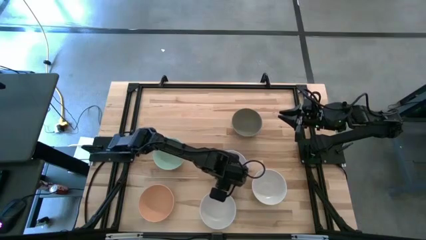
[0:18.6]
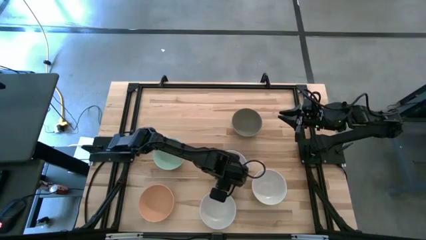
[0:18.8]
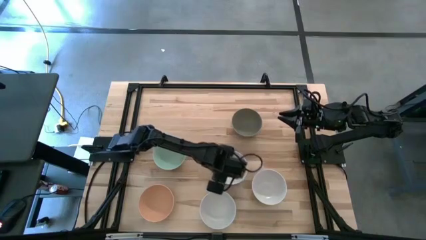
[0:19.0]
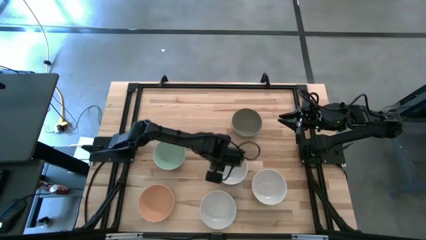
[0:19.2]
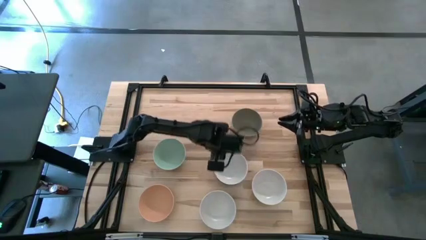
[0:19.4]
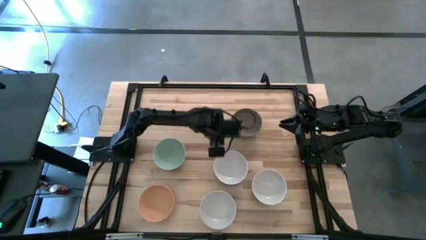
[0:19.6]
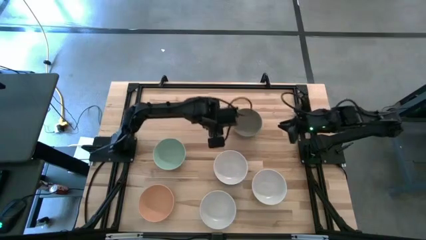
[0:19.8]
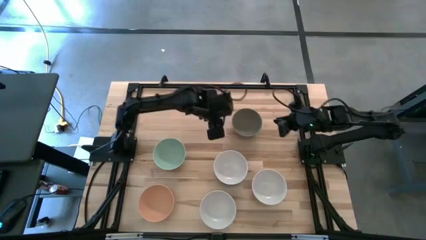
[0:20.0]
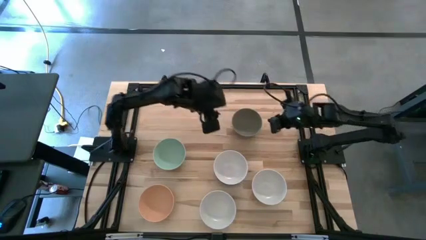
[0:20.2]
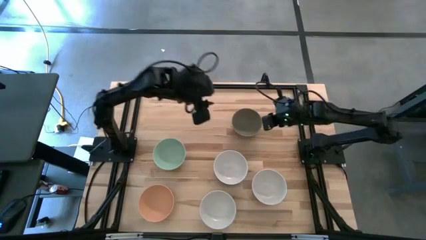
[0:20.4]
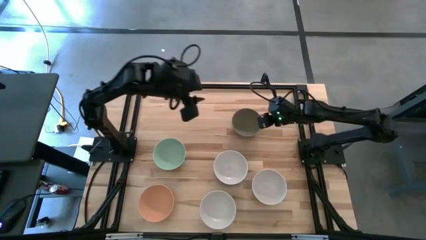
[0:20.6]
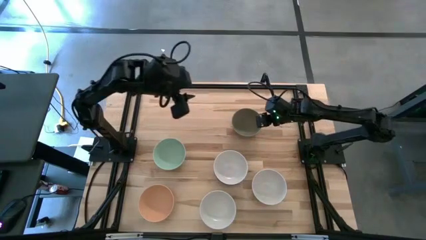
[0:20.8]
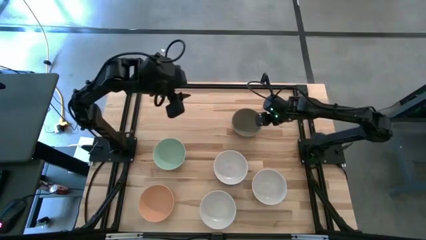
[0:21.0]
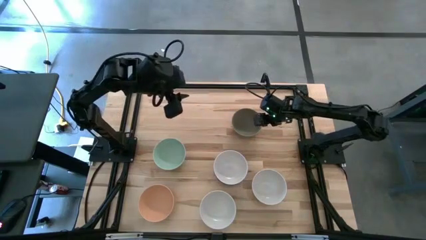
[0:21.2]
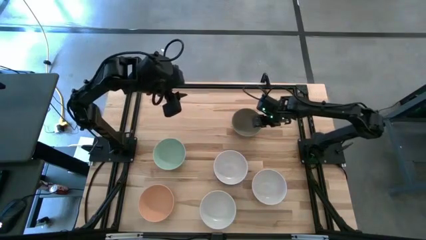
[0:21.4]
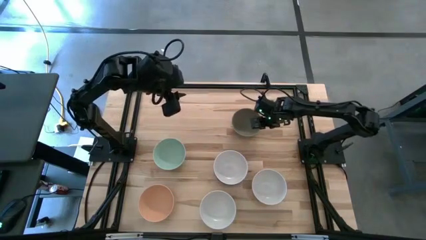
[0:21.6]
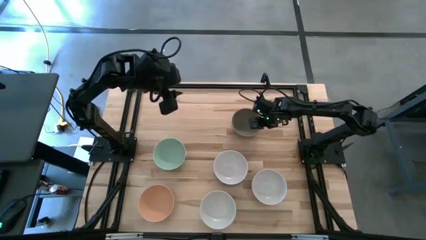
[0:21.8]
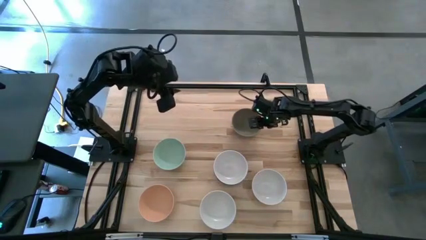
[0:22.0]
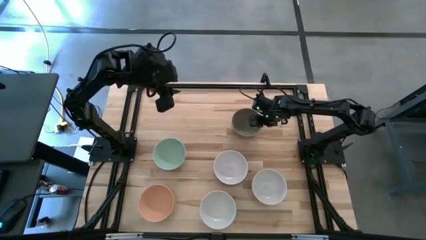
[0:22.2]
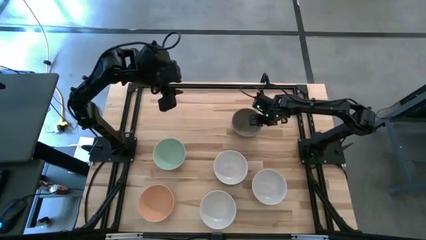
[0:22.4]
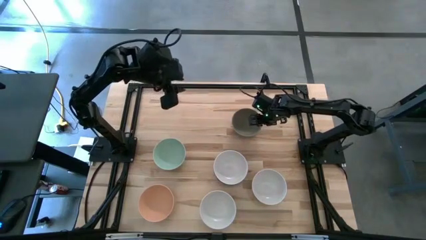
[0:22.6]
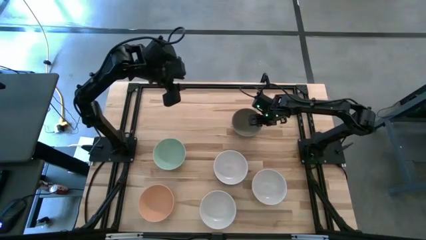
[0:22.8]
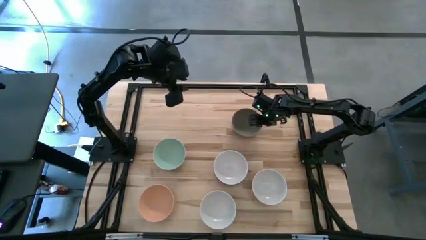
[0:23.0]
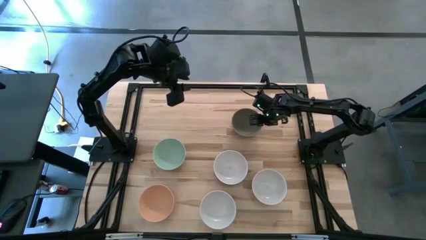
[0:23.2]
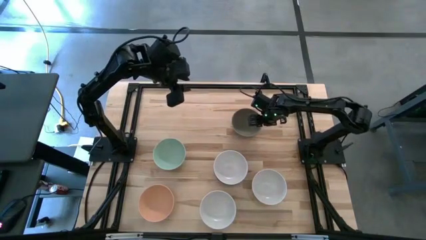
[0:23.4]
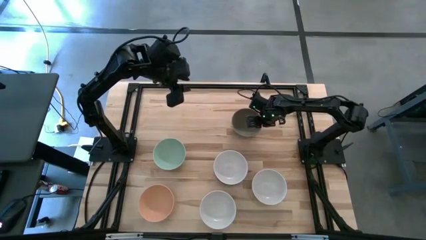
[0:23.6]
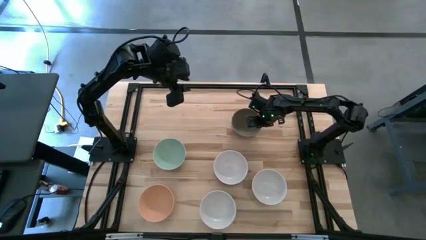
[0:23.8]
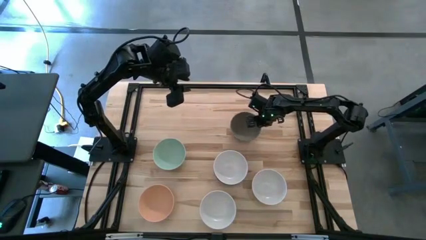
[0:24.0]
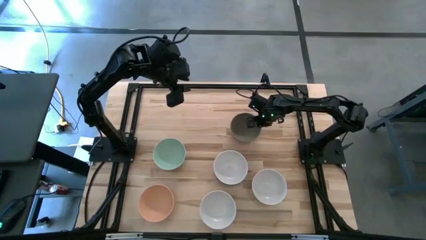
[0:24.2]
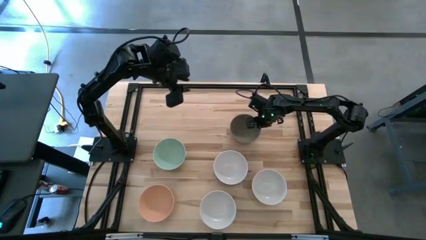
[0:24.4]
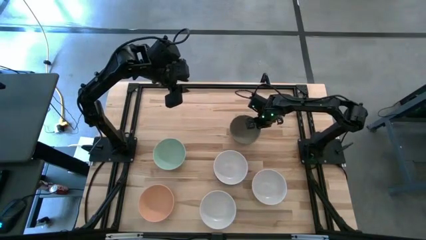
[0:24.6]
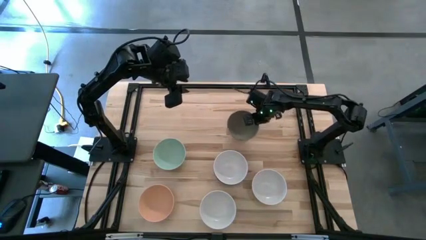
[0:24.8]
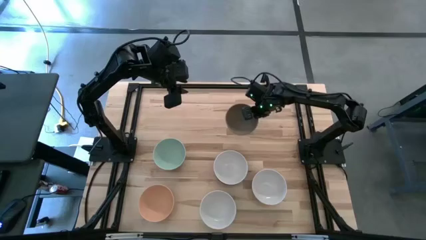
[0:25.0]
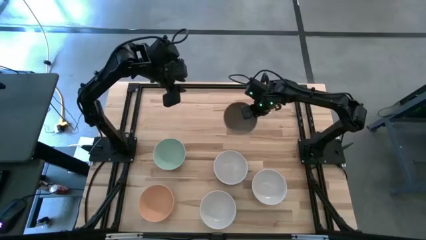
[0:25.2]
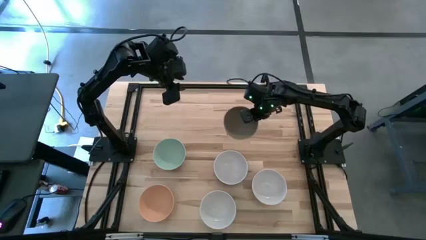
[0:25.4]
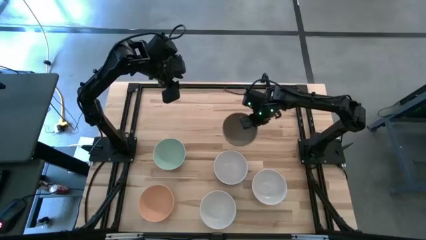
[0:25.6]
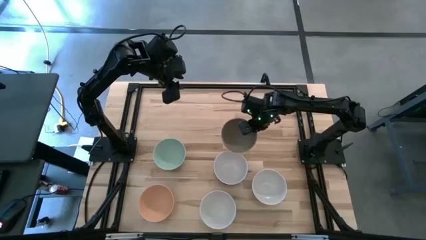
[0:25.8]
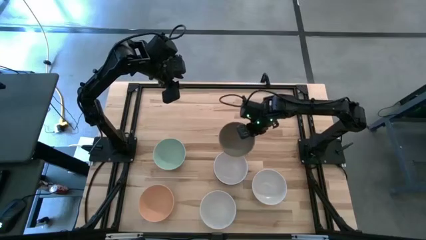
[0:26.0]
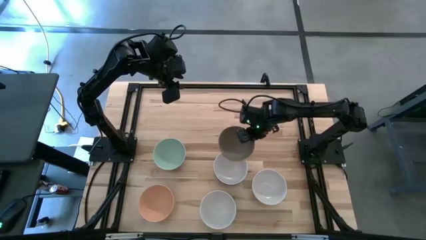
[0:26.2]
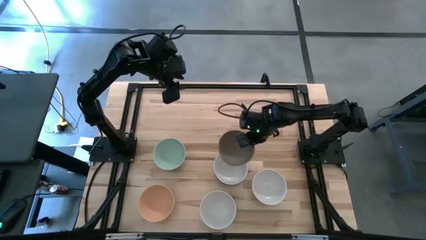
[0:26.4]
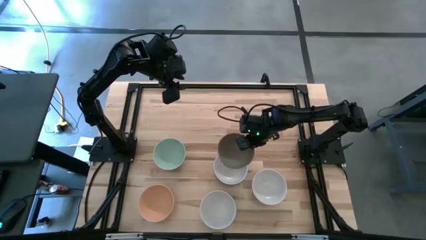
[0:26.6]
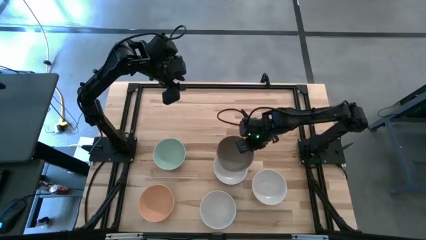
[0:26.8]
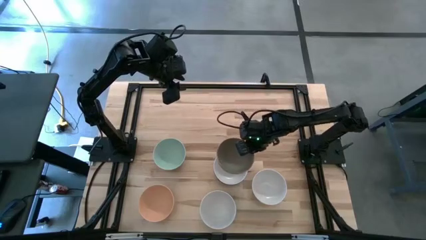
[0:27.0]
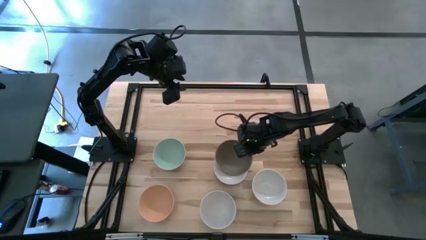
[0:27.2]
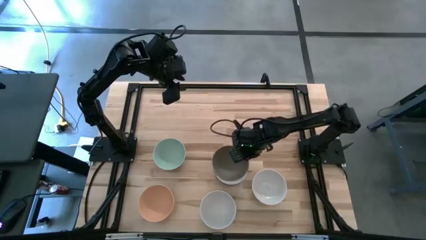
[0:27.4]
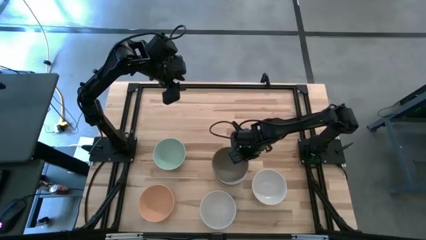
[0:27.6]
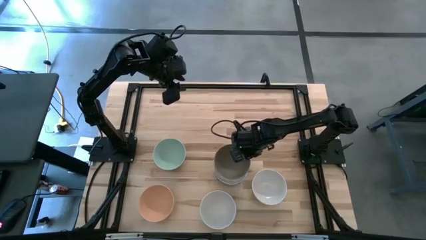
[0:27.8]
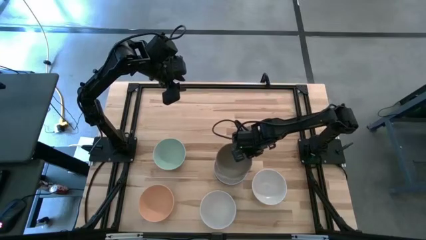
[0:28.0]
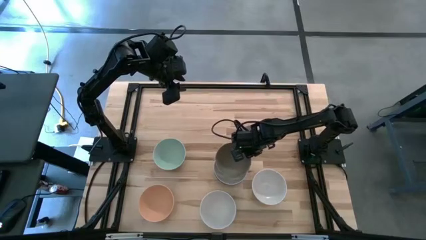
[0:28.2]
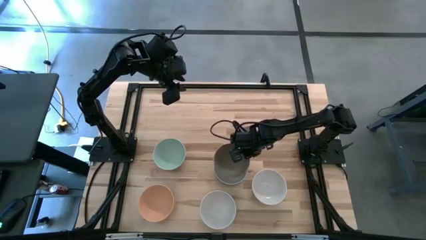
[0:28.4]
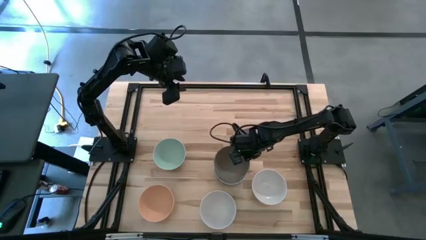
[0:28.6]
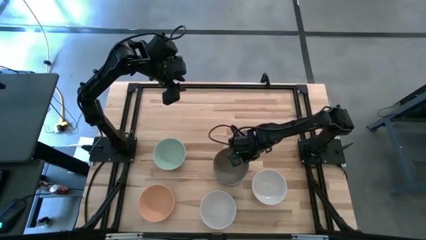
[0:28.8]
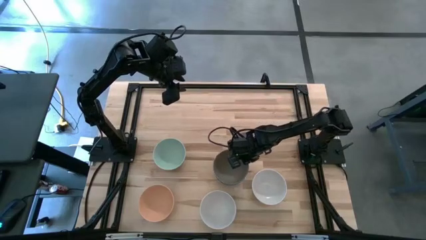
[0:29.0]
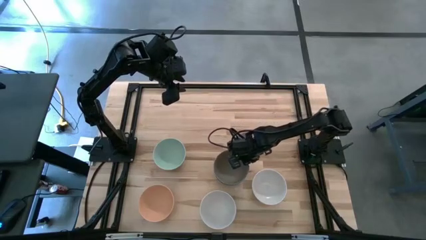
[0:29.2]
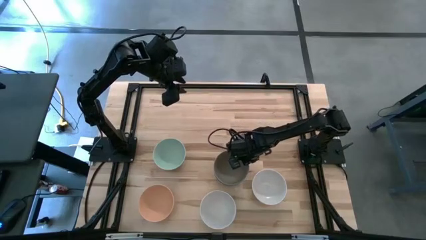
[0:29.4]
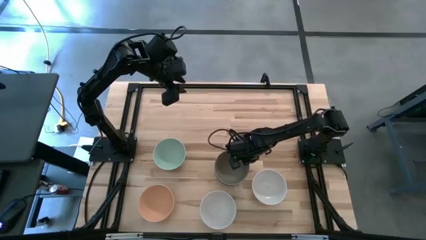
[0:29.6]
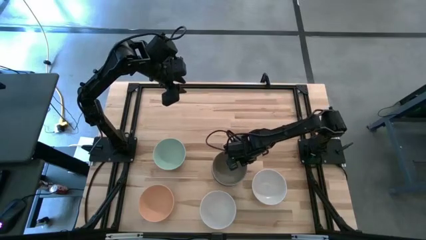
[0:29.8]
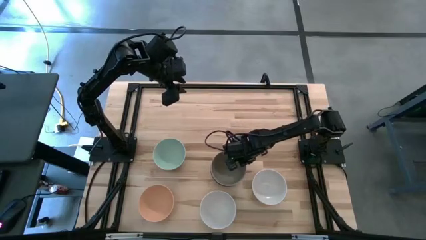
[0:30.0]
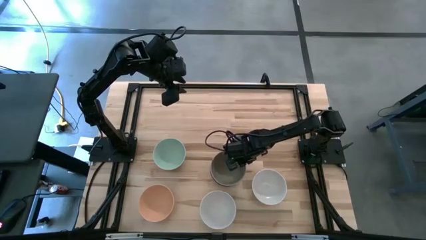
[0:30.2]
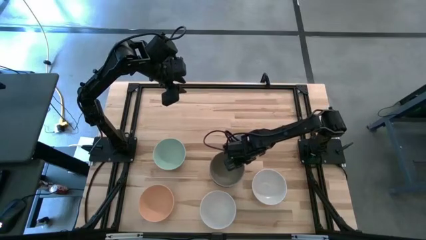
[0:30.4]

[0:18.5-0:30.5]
Task: Nest bowls inside each other
Stack the gray bowl on top of the white bowl
